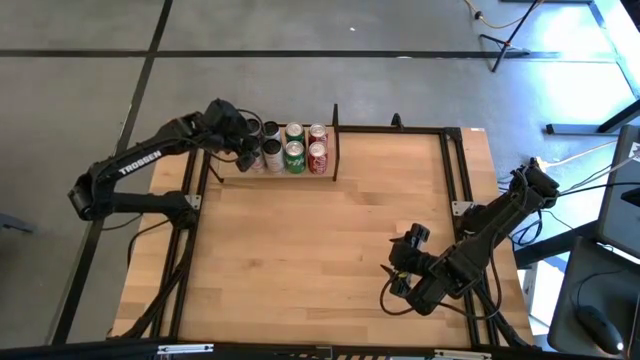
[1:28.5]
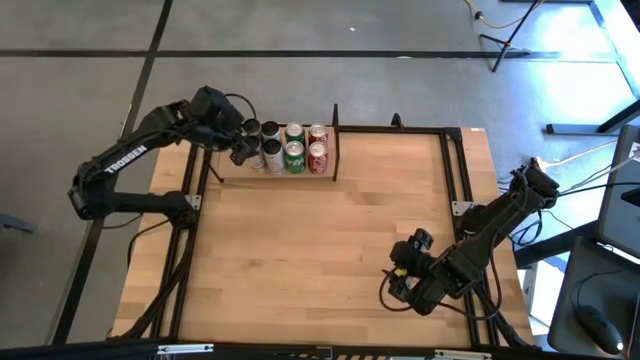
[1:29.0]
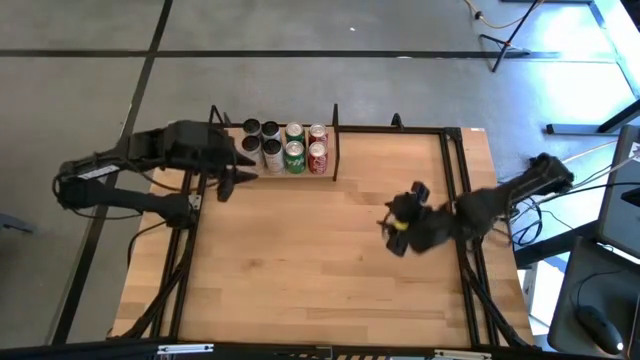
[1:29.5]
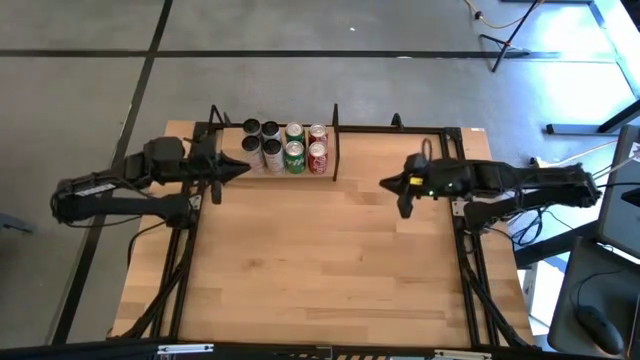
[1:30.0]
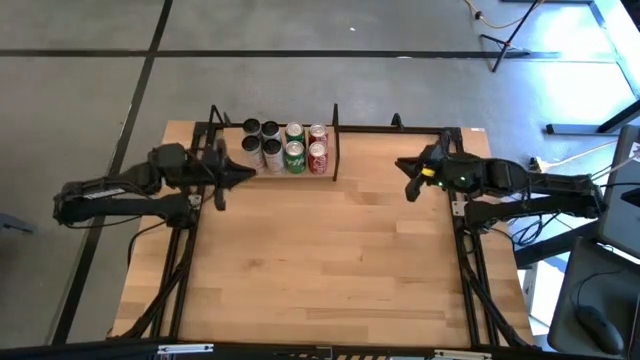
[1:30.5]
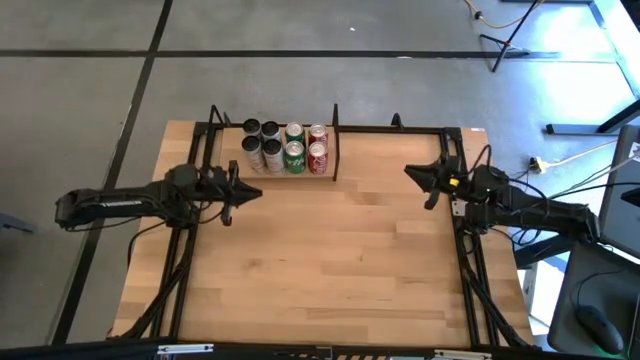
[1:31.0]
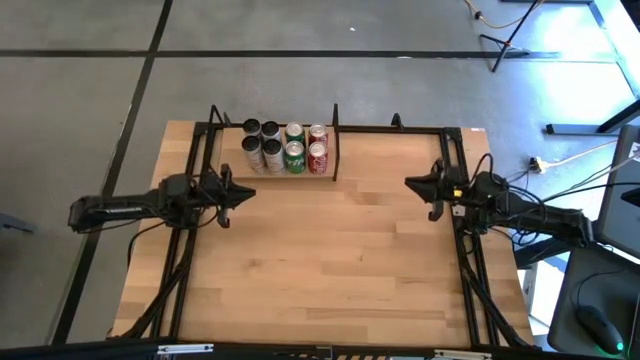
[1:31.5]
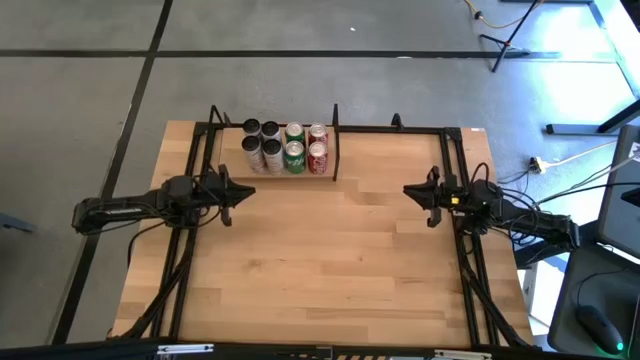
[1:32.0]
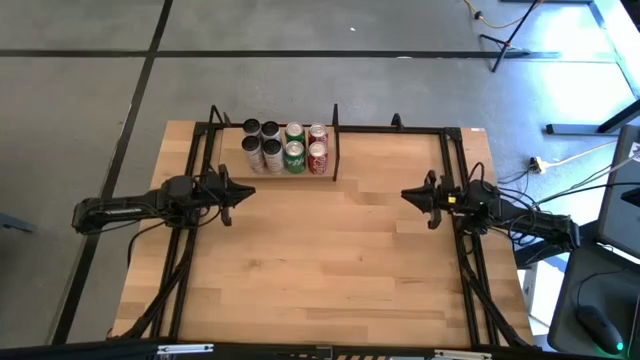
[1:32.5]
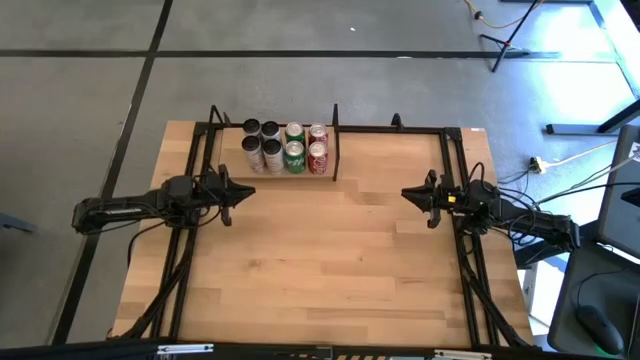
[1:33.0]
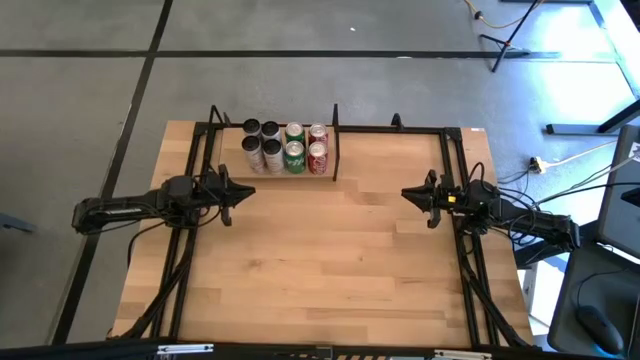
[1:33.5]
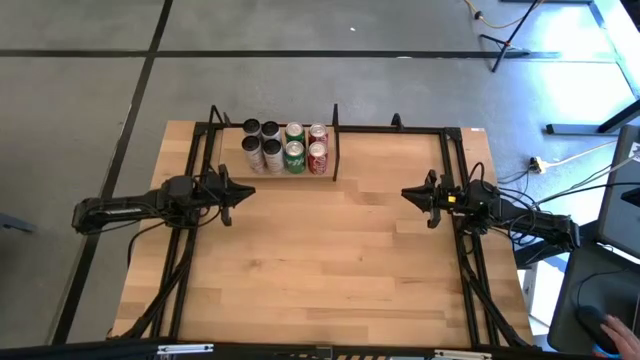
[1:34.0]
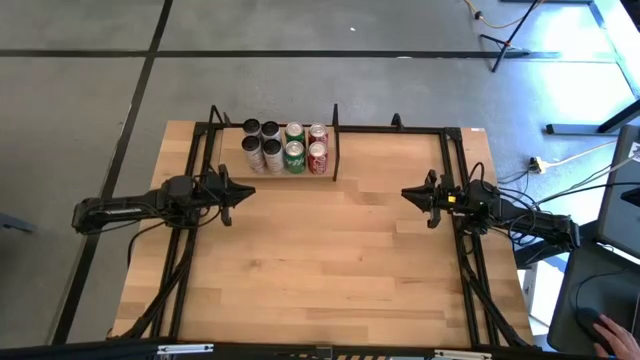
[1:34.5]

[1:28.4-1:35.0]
Task: Place canned beverage on shelf
Return to Home Position

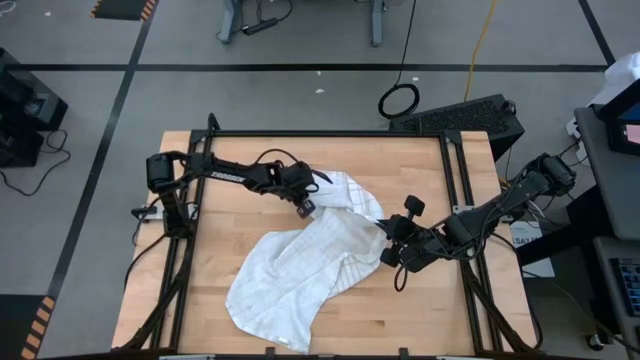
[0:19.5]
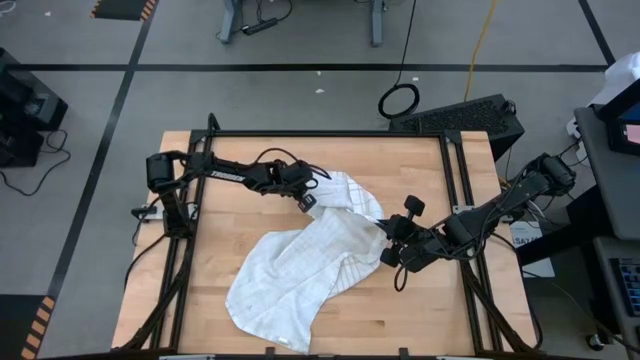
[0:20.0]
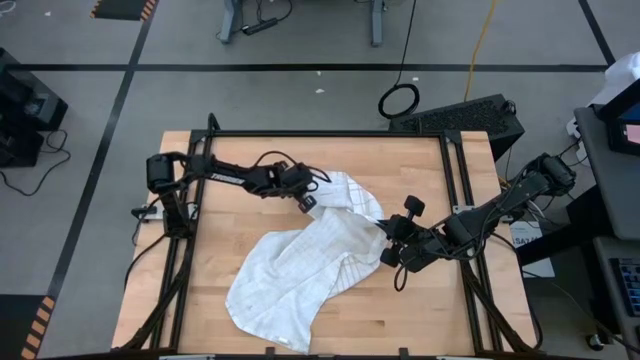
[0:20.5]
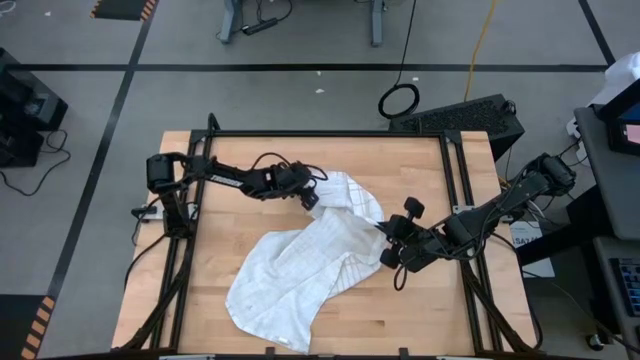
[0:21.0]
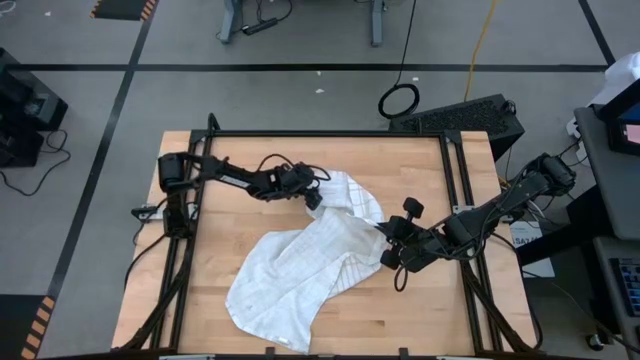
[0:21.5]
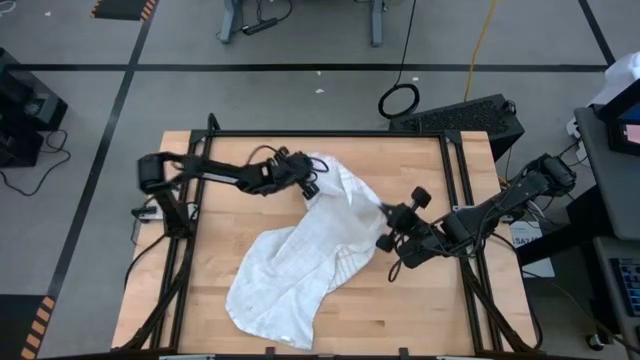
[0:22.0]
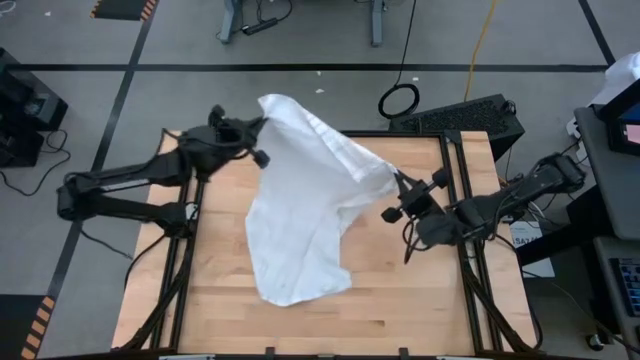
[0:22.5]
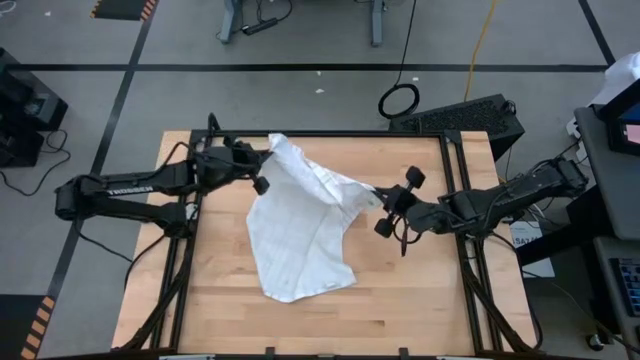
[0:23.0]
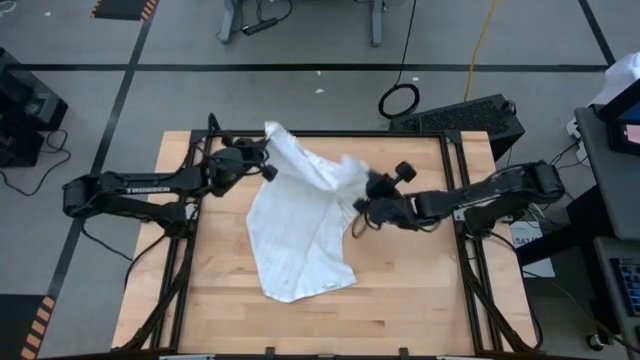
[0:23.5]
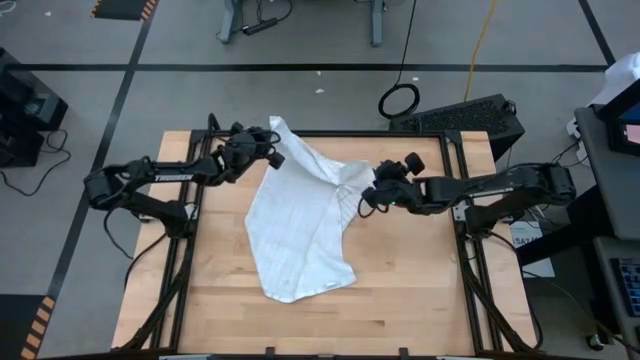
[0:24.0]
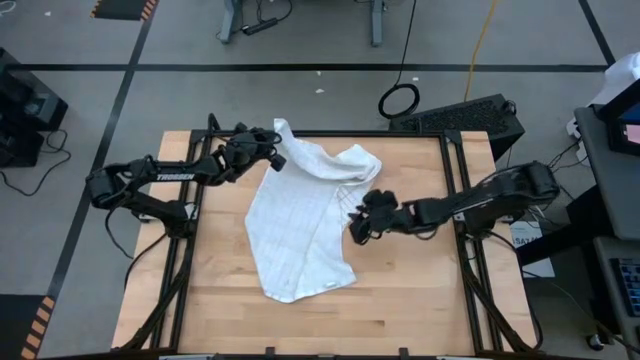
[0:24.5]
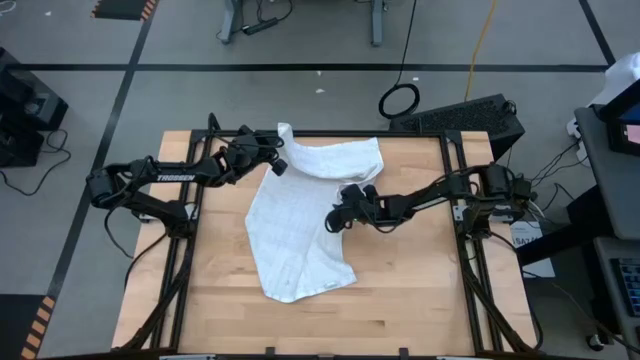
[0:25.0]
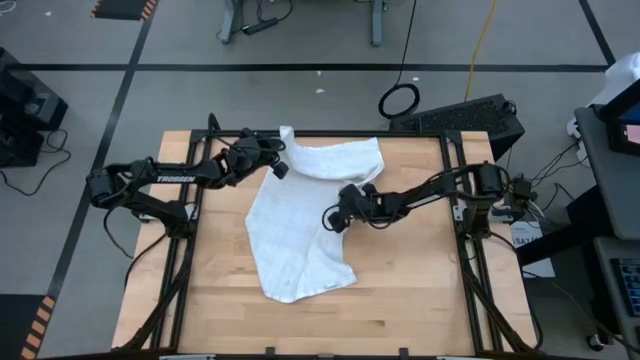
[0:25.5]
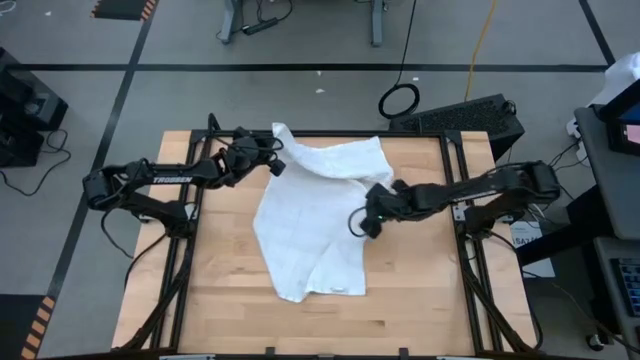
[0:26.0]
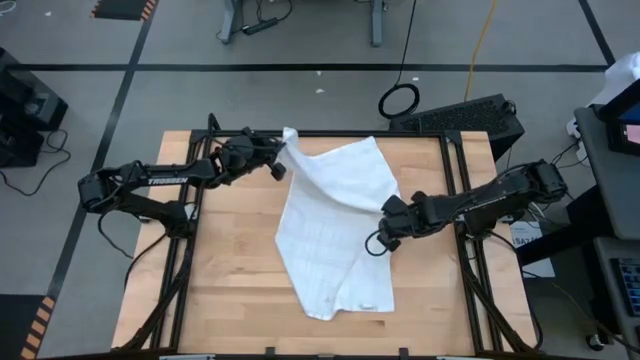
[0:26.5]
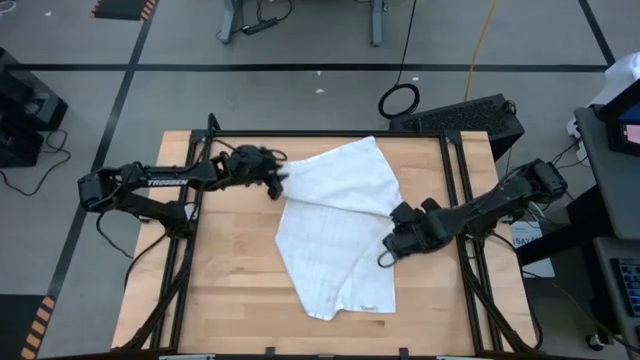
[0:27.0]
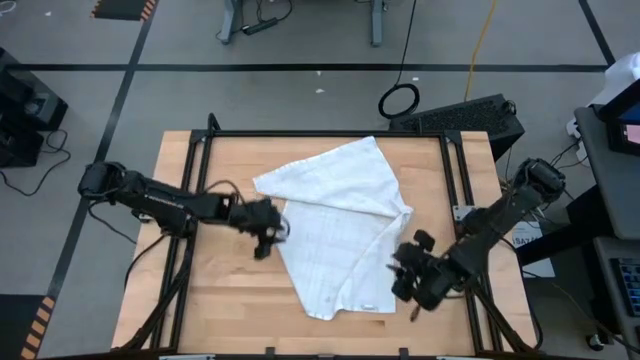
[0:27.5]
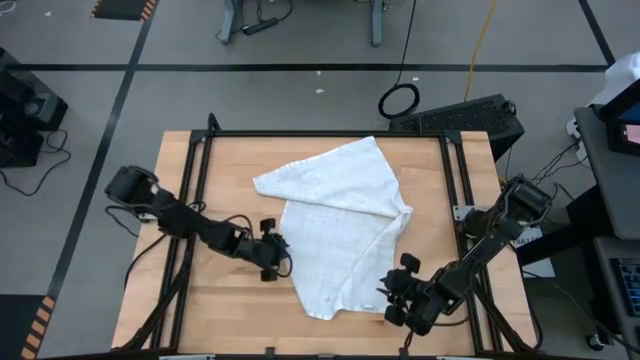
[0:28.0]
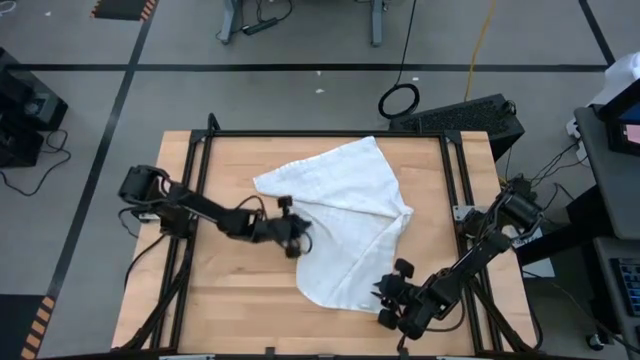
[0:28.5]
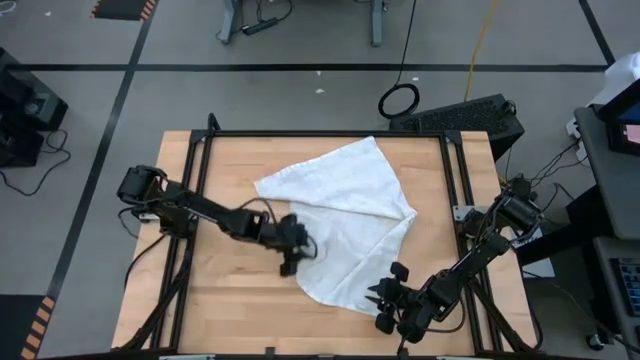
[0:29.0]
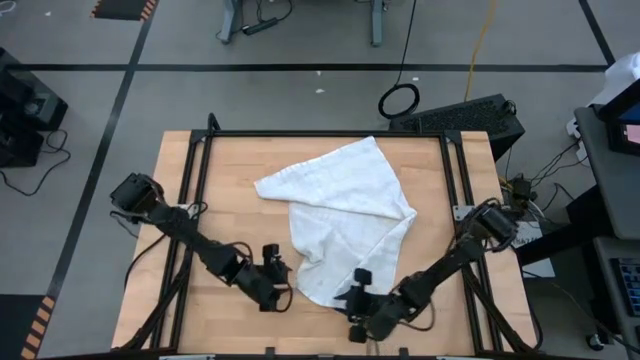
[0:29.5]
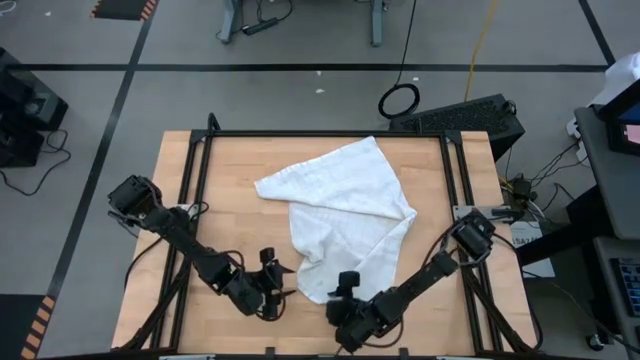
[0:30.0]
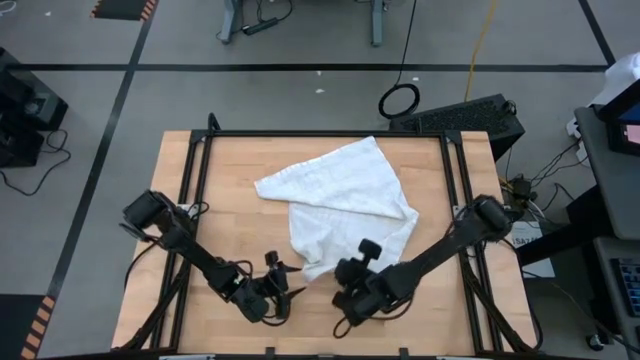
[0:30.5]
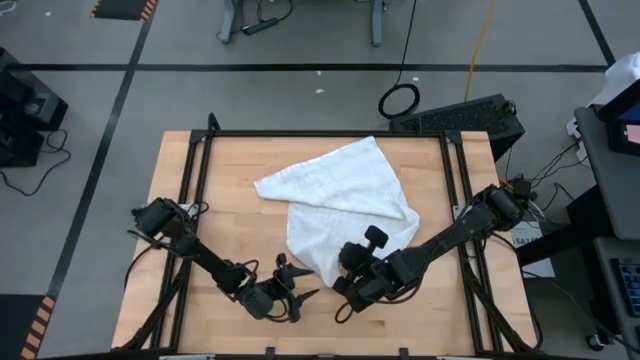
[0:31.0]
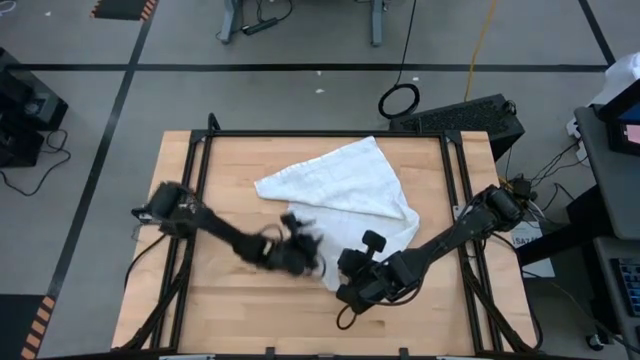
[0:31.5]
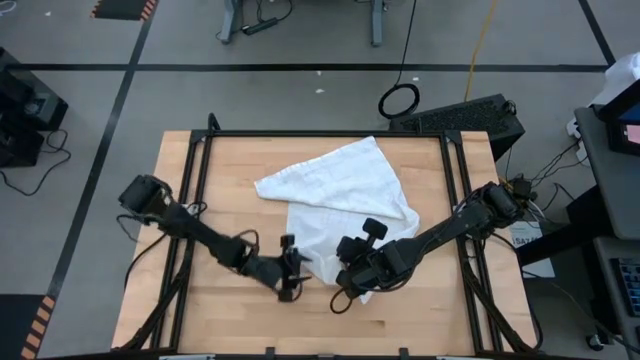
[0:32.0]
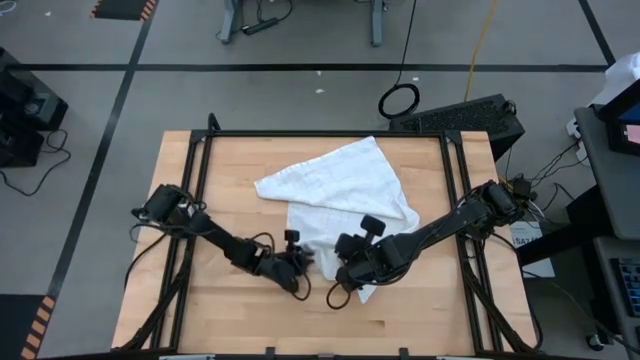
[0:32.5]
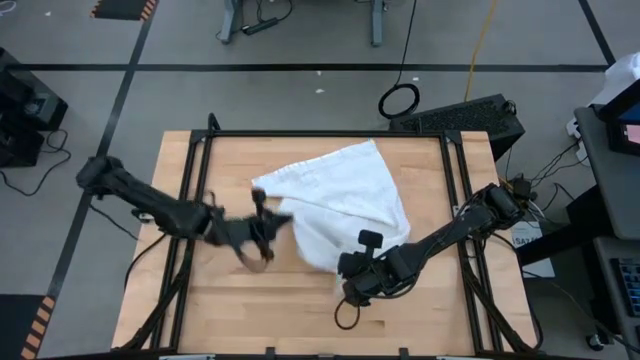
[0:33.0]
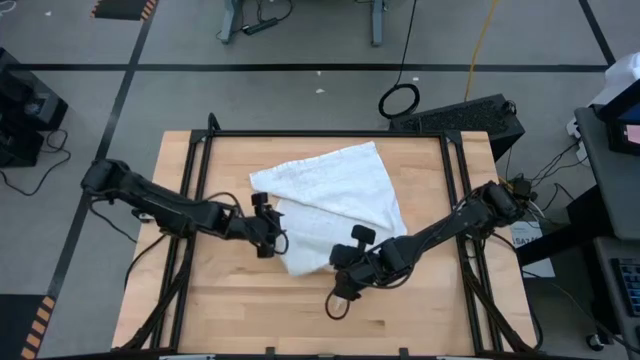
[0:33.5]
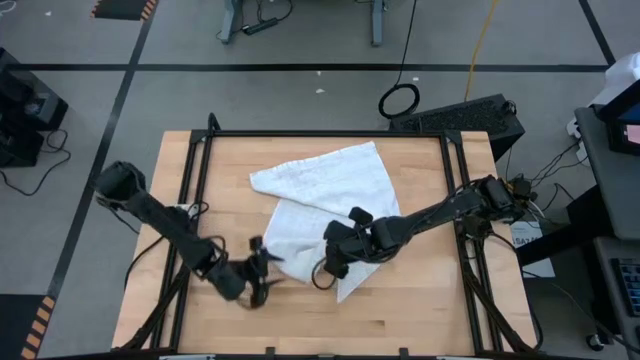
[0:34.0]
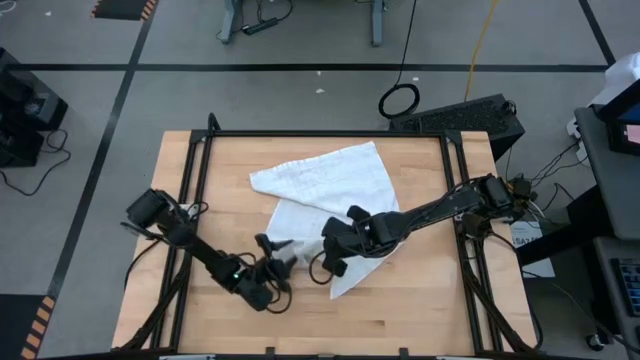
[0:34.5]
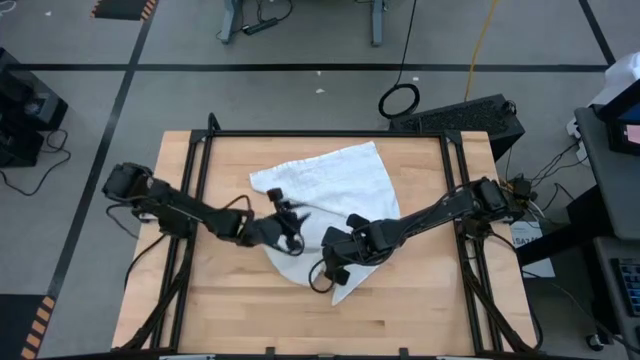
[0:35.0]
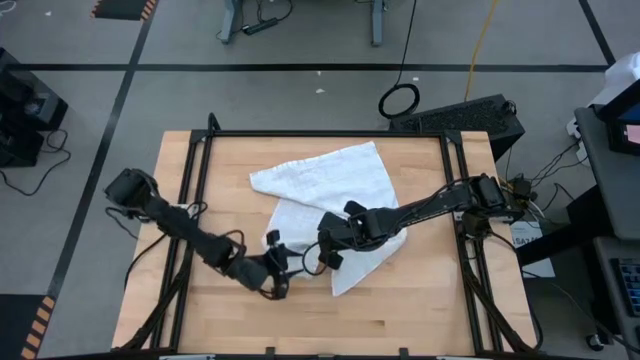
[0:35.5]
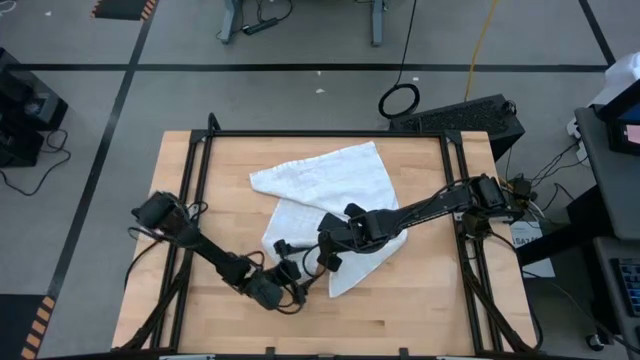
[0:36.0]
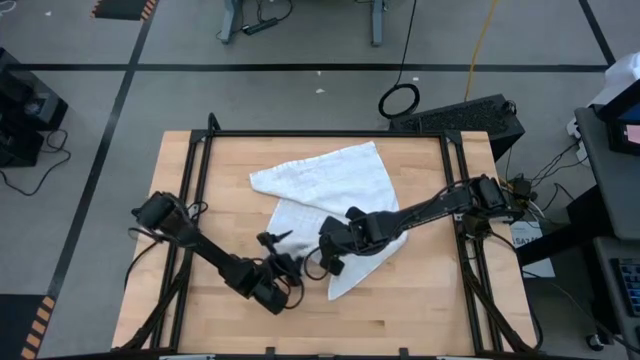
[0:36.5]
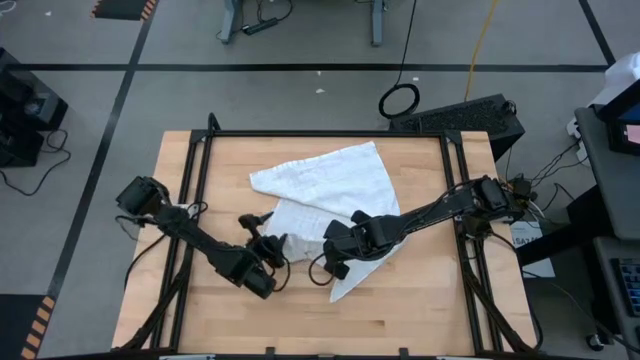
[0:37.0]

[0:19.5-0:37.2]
Task: Roll towel
Roll the white towel
